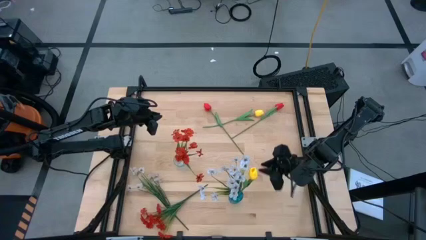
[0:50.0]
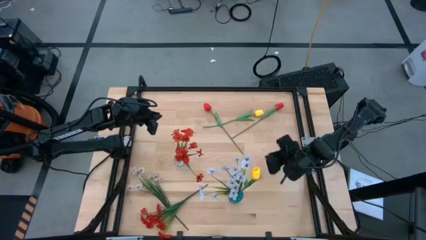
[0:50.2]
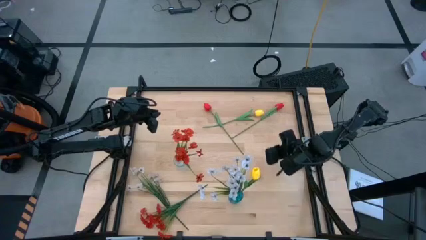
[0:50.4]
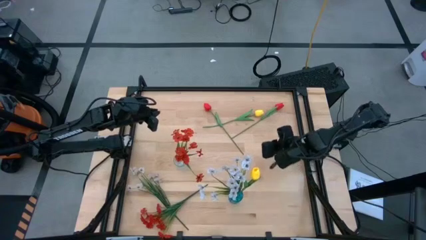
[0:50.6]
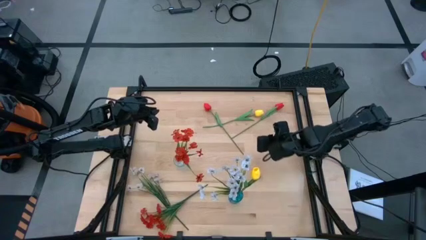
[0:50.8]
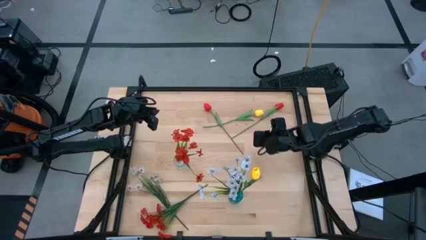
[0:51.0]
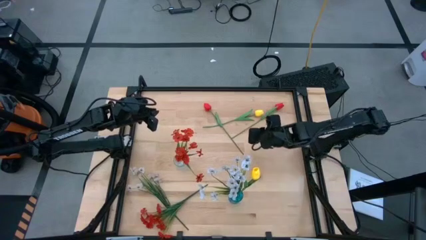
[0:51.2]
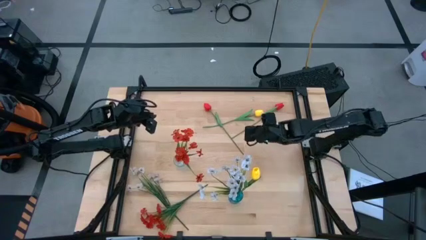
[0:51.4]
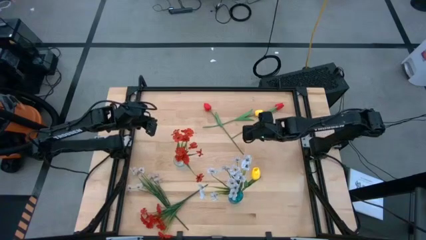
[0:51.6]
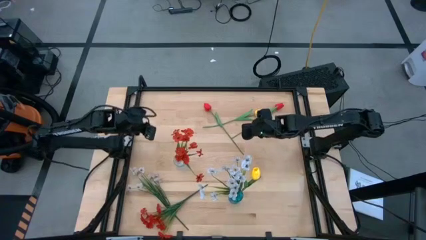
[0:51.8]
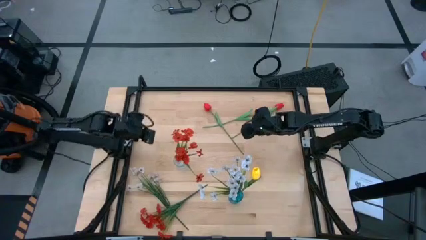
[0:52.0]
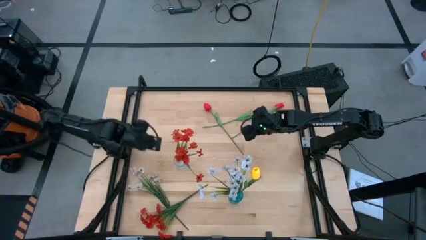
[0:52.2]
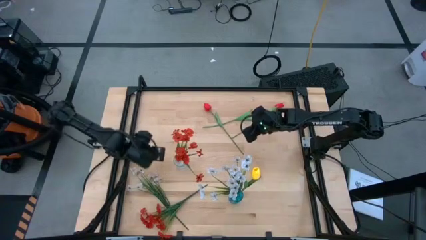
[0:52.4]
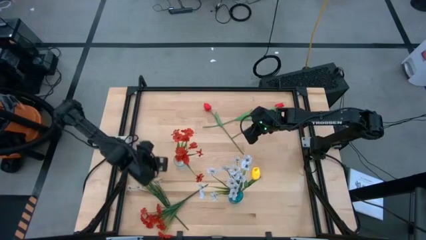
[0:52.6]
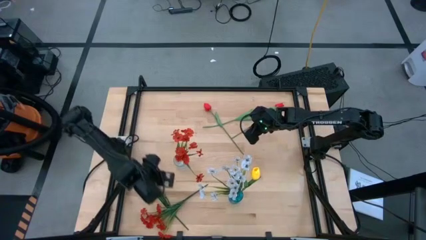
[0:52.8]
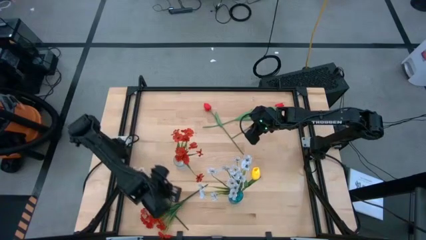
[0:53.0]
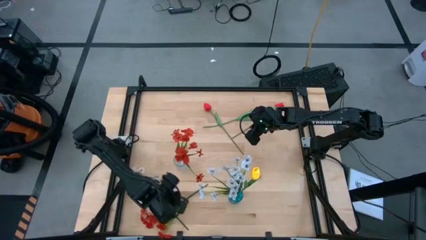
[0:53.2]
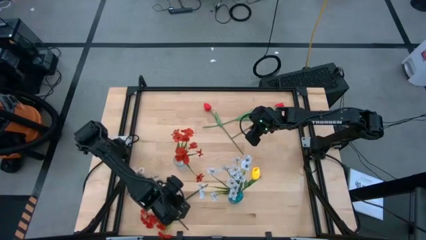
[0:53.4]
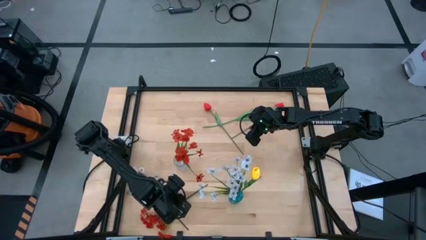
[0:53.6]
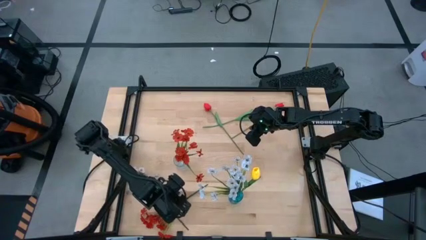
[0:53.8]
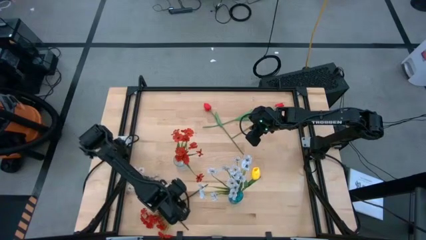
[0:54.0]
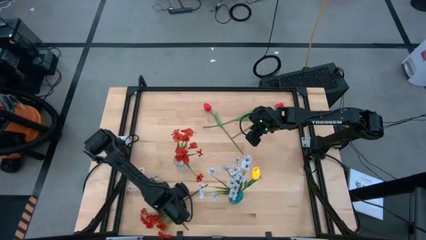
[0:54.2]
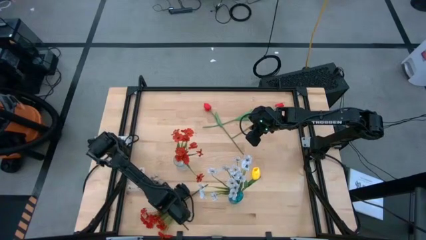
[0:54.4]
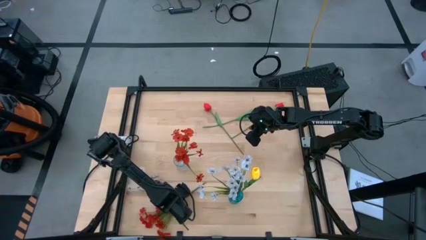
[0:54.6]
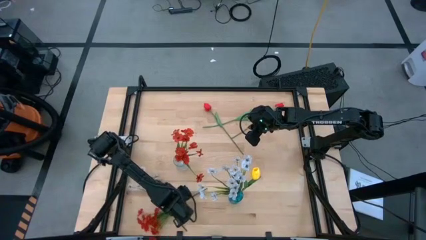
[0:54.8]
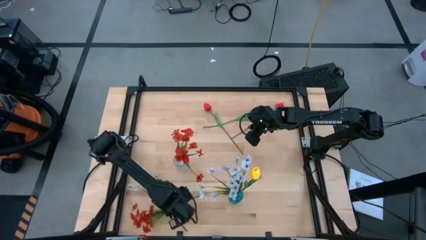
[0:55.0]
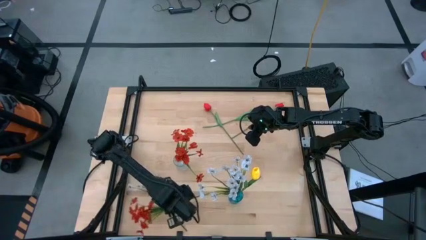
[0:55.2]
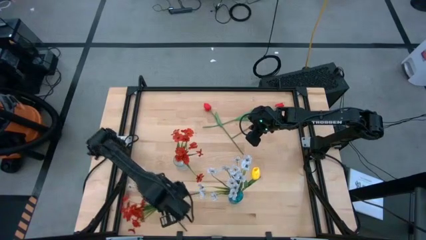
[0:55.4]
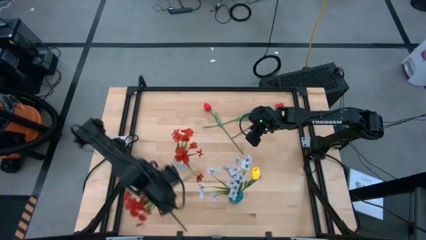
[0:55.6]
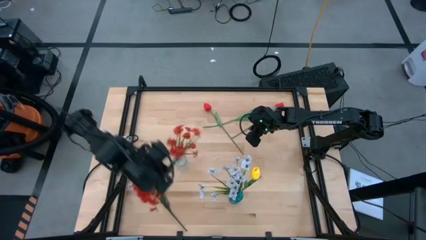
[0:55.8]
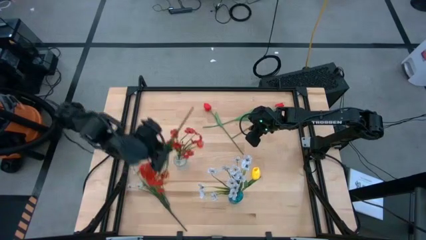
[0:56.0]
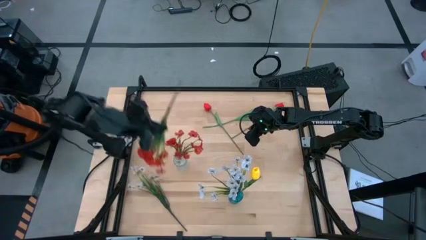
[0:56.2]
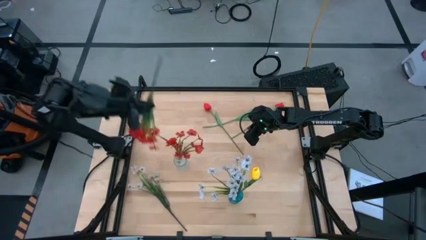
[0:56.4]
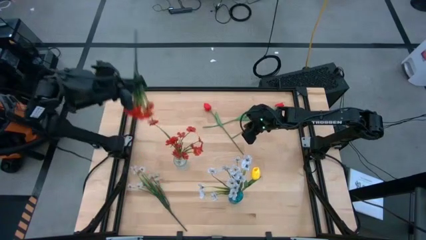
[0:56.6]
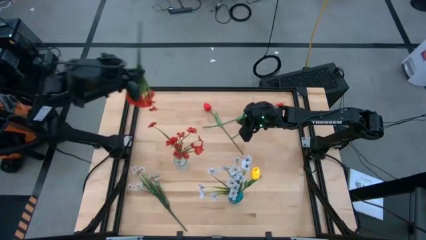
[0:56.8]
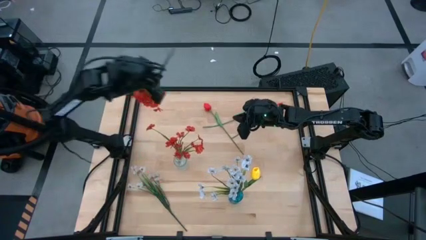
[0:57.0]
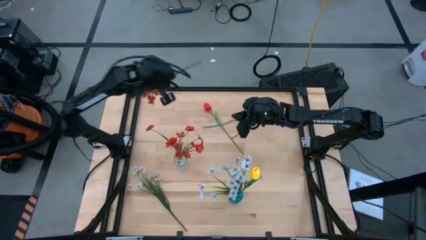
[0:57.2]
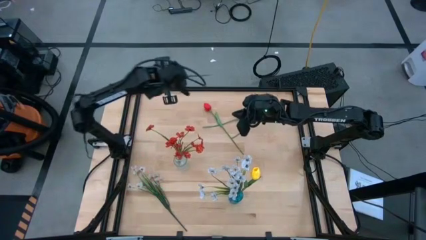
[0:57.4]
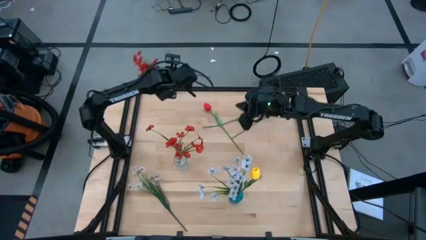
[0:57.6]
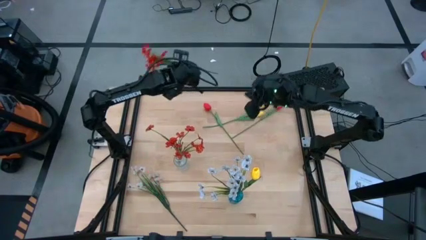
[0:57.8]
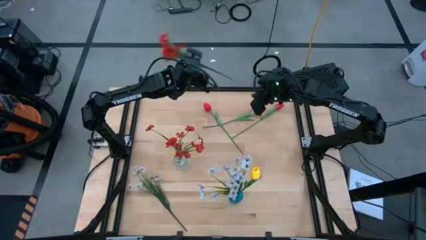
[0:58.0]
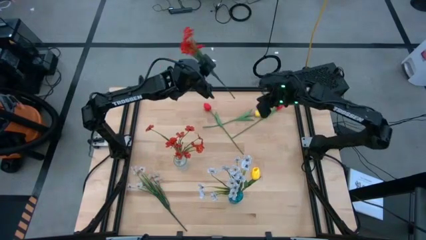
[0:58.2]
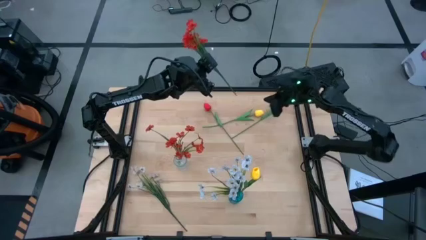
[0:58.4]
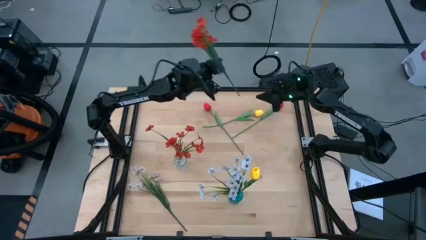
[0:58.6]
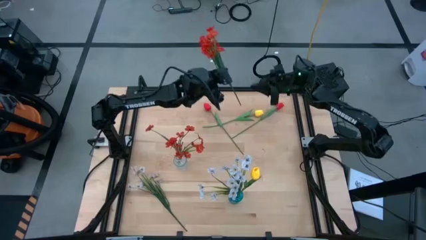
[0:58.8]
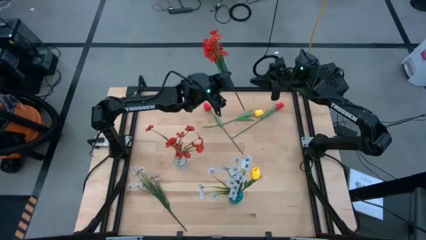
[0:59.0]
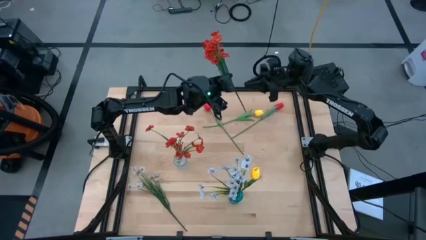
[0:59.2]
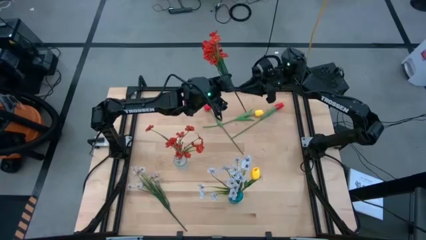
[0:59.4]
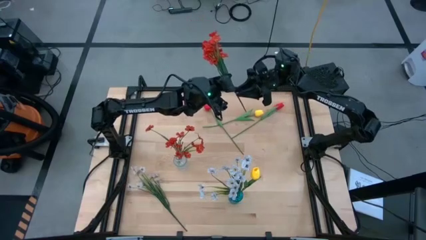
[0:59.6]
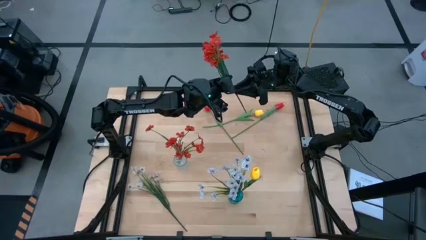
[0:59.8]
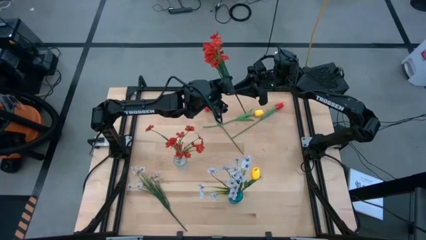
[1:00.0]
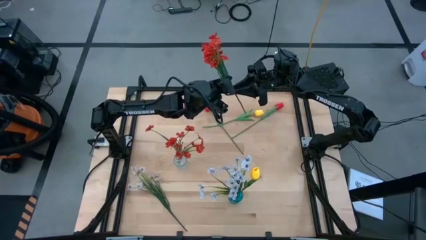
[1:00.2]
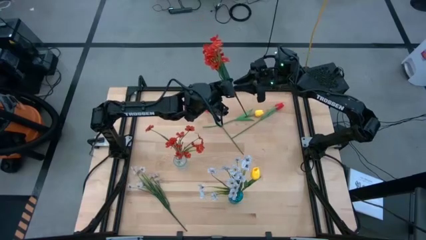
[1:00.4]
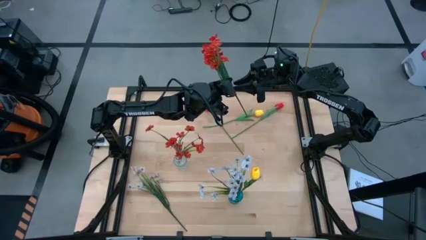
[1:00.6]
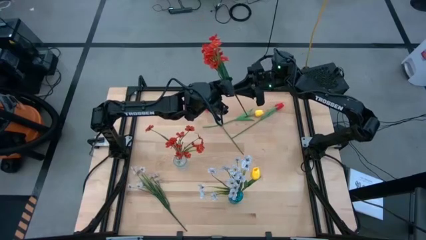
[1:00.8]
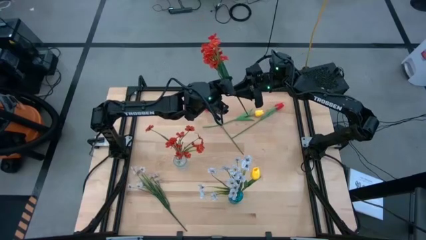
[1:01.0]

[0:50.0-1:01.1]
Task: Sort flowers into vase by color
Put the orange flowers into the transparent vase

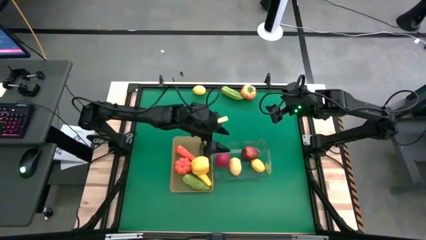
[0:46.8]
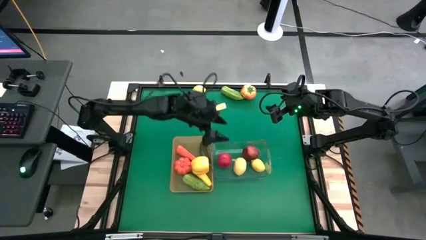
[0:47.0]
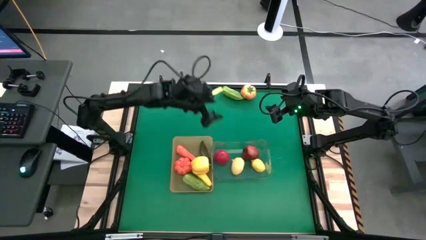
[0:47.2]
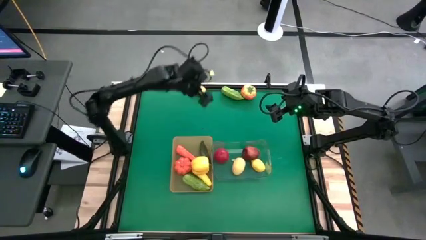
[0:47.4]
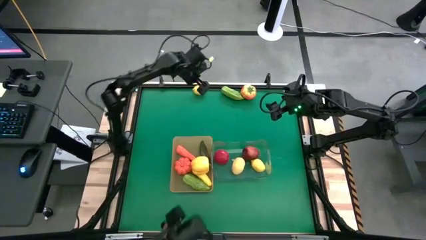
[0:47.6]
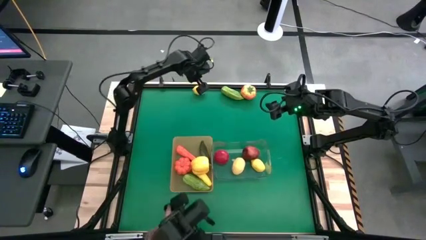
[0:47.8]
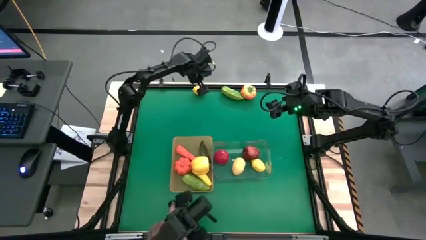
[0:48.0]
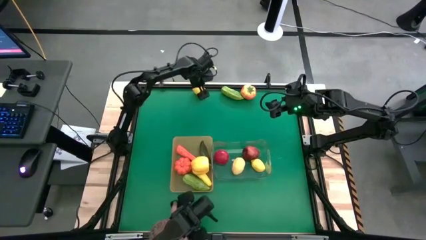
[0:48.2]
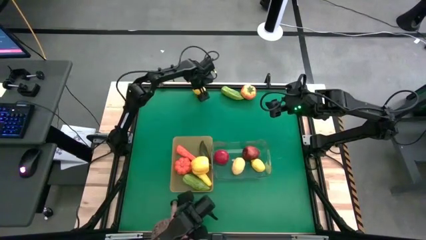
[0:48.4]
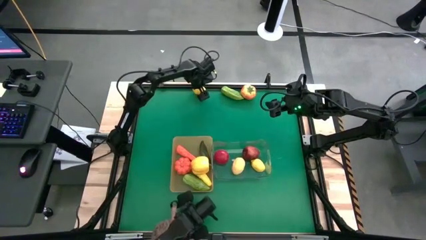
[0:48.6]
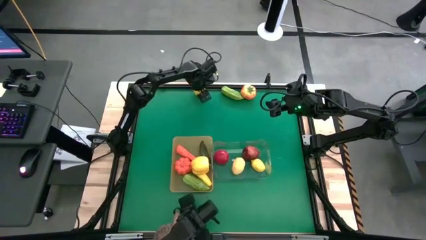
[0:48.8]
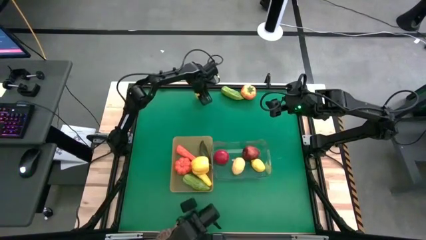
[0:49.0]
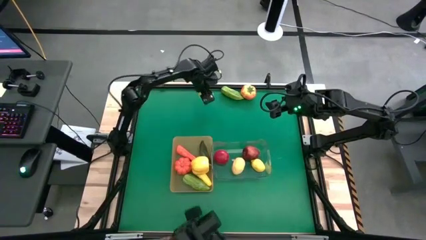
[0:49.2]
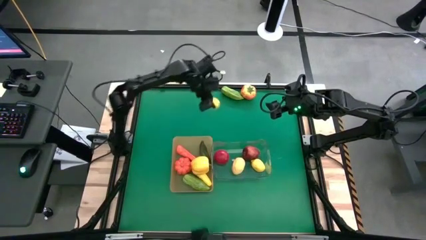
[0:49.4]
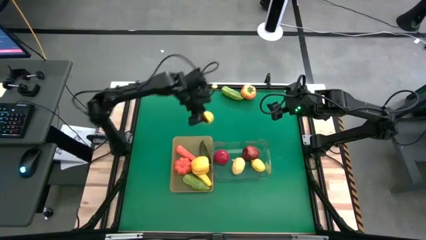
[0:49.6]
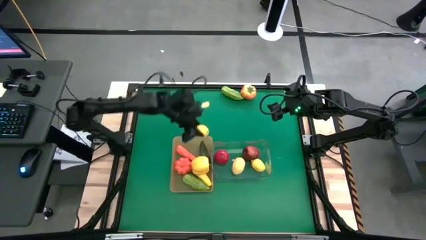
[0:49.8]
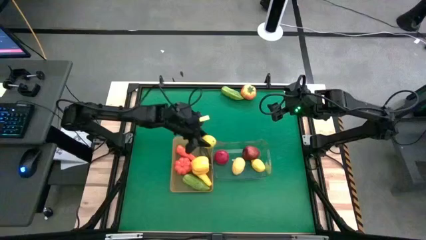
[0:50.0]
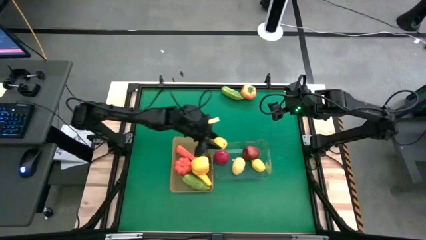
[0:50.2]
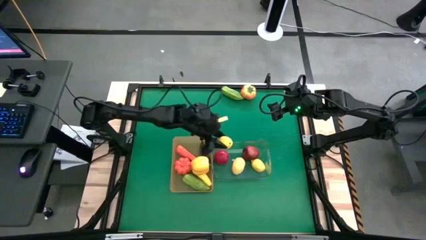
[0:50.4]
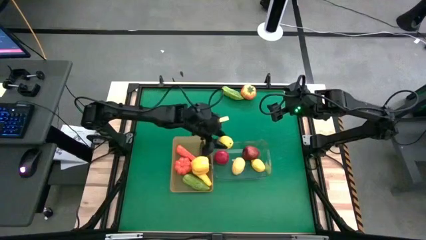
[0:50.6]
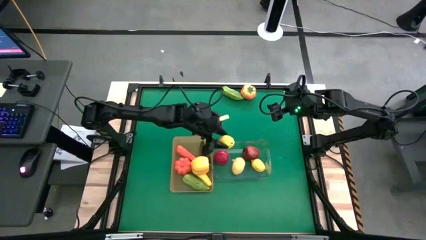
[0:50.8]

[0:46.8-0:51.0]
Task: Sort produce into baskets
Put the lemon into the transparent bin

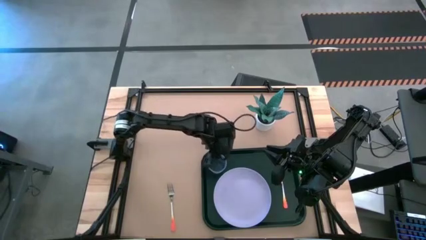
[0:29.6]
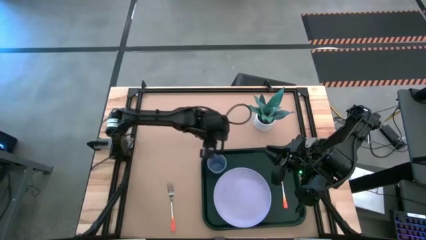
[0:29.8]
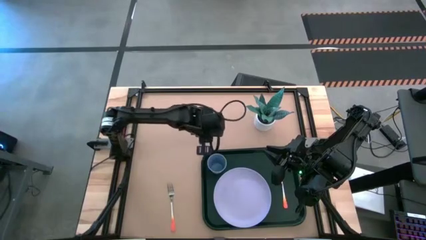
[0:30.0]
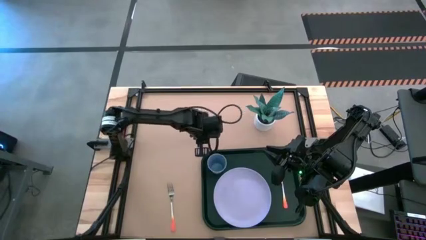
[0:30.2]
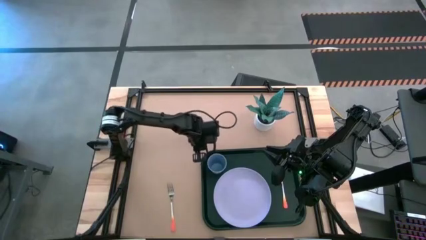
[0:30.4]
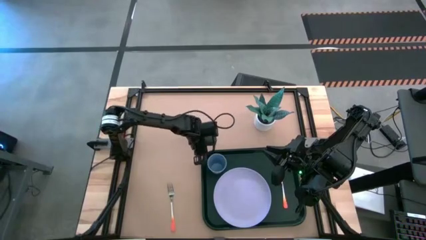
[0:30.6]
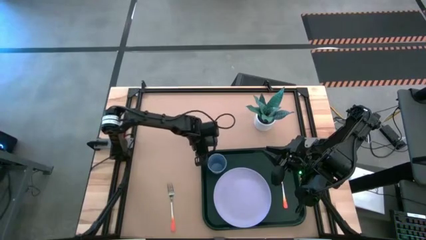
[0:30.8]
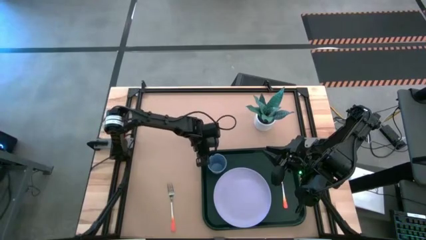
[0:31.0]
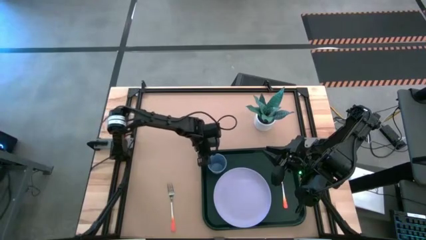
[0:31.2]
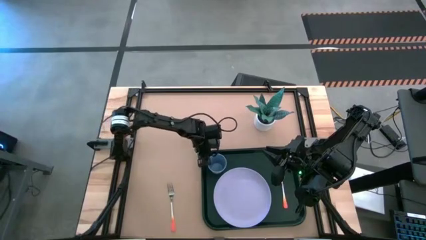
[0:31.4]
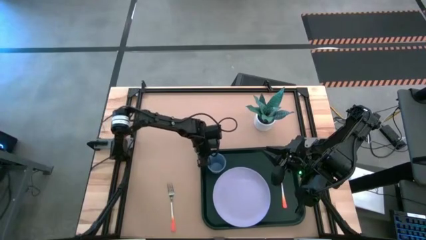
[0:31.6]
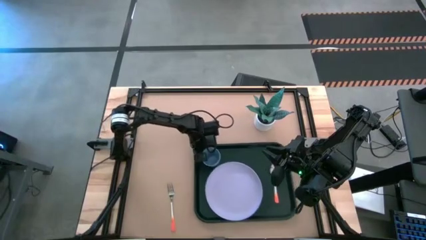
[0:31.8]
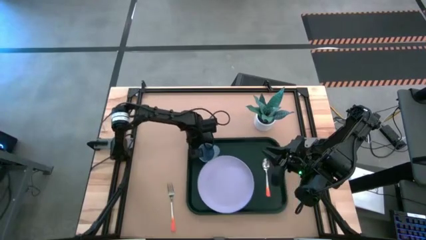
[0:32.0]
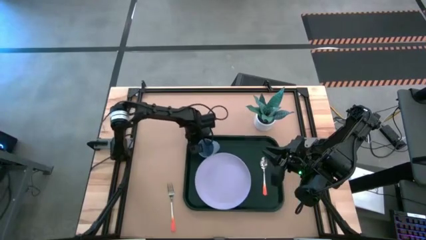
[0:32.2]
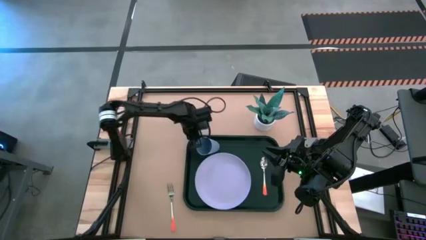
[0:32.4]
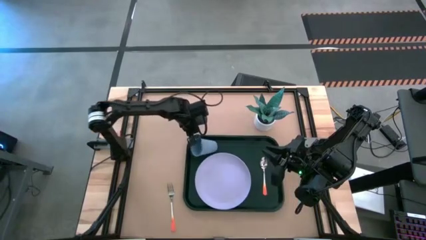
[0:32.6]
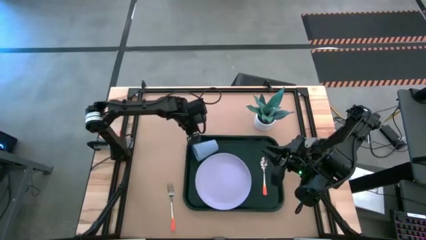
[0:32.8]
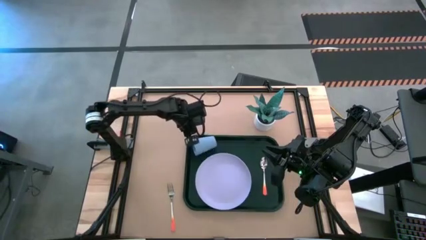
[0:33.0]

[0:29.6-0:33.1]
Task: Pick and place plate/cup/fork/spoon on tray
Adjust the dark green serving tray on the table
